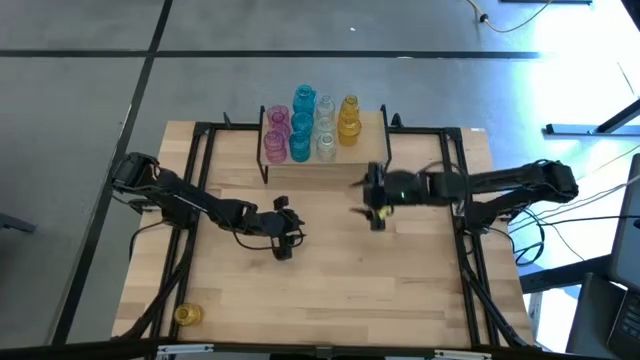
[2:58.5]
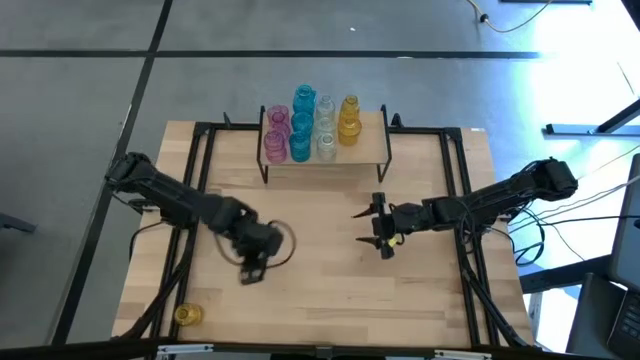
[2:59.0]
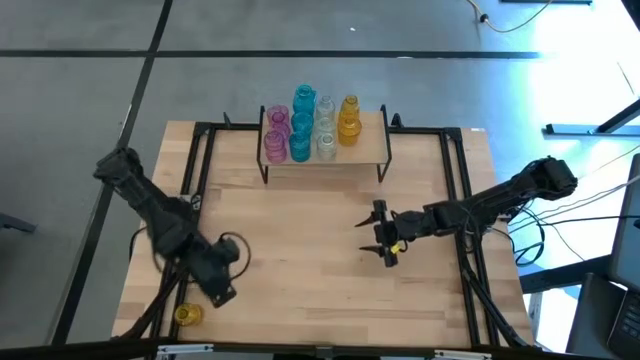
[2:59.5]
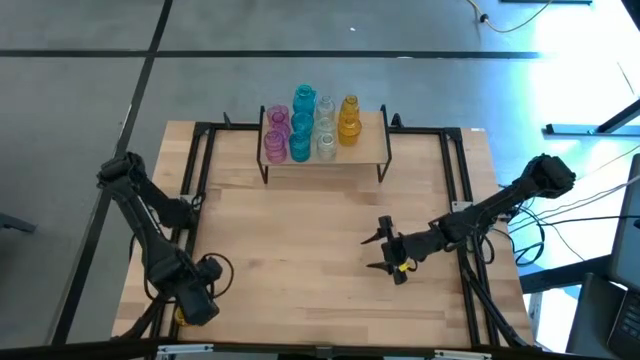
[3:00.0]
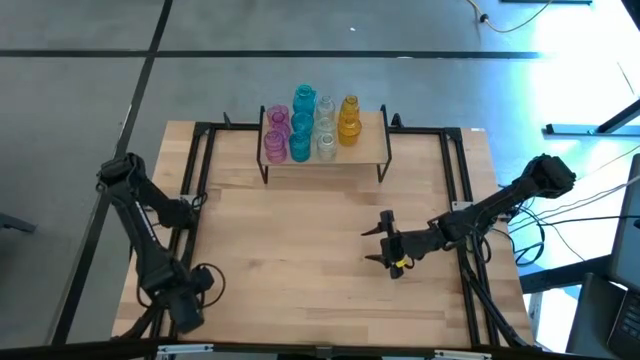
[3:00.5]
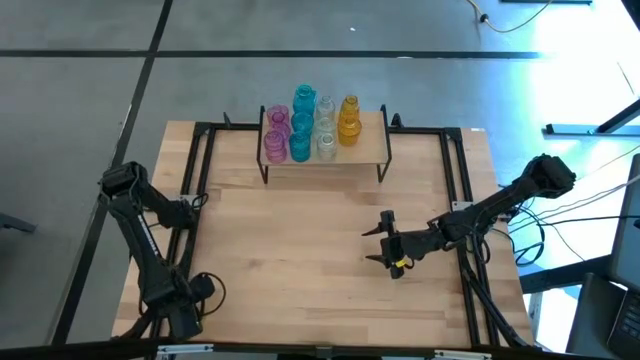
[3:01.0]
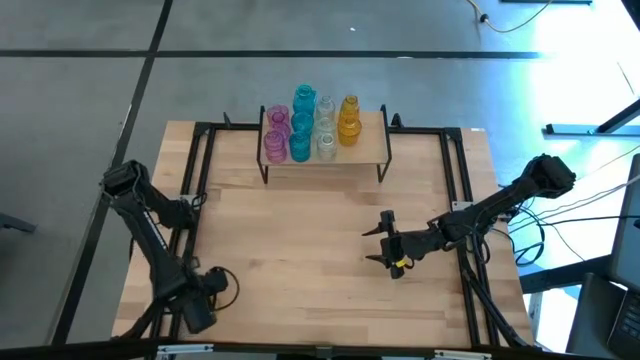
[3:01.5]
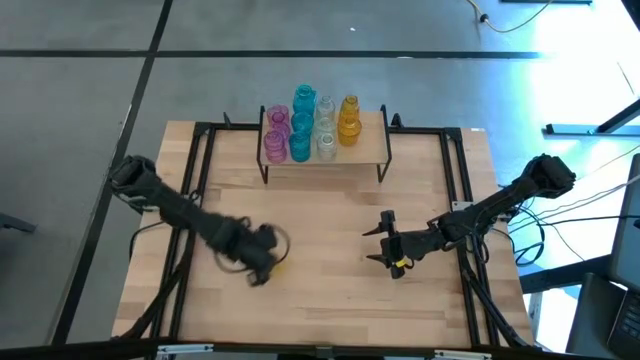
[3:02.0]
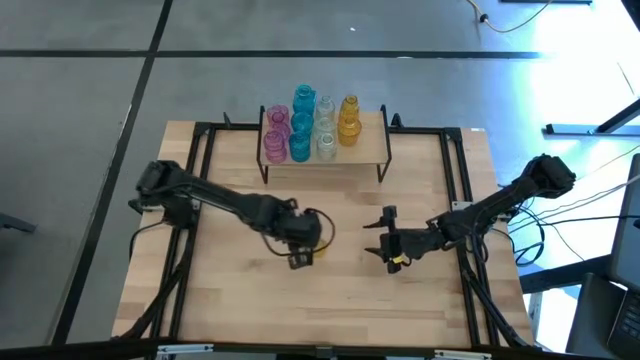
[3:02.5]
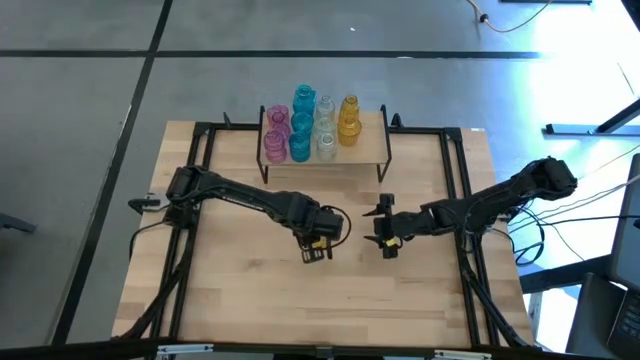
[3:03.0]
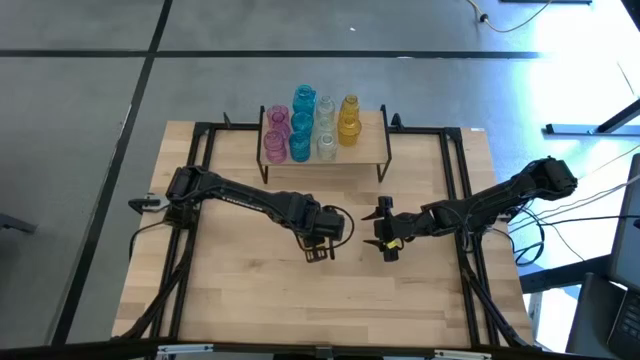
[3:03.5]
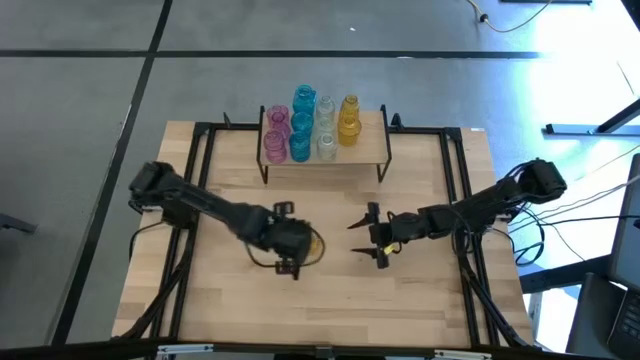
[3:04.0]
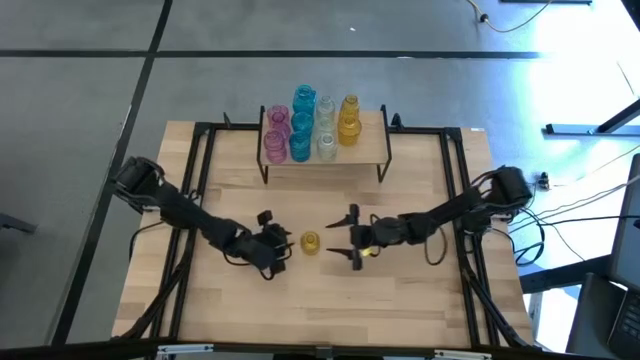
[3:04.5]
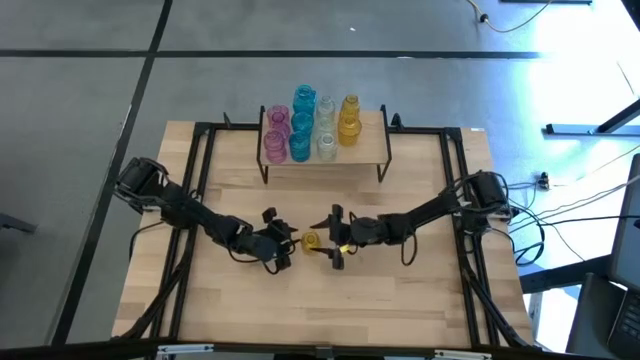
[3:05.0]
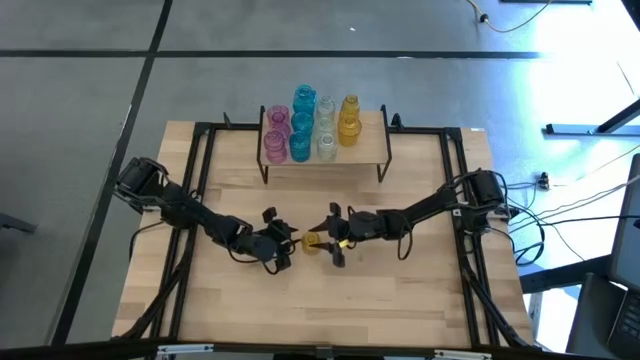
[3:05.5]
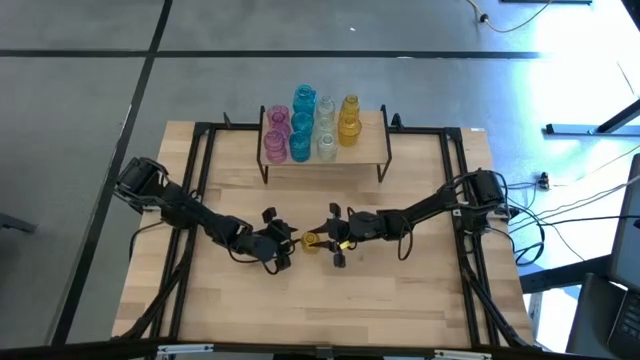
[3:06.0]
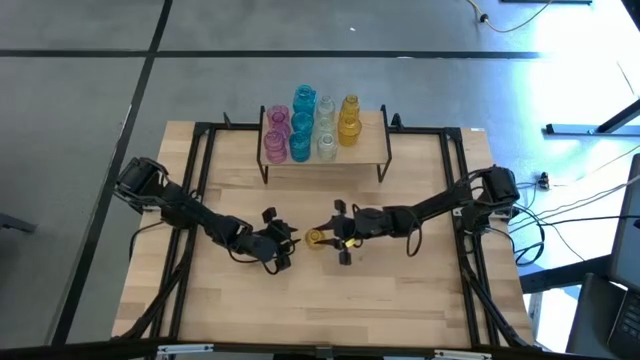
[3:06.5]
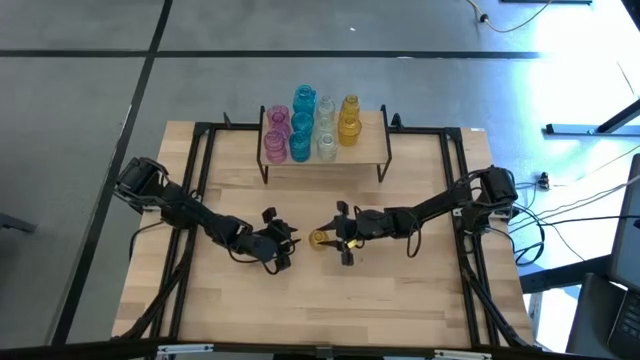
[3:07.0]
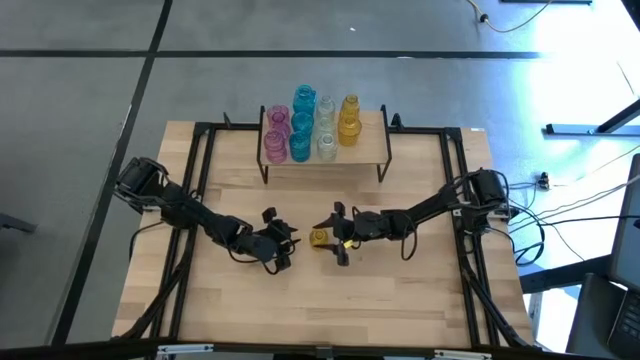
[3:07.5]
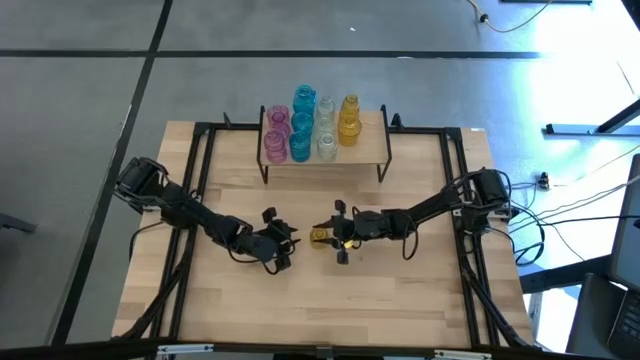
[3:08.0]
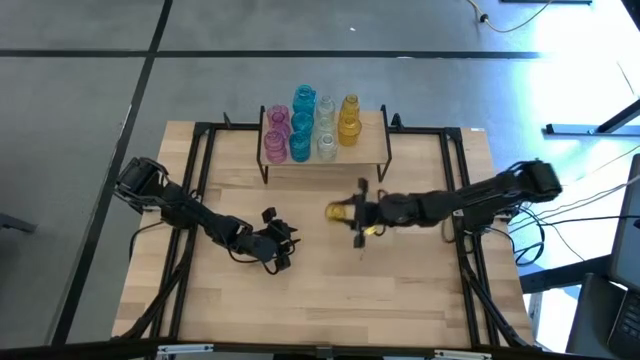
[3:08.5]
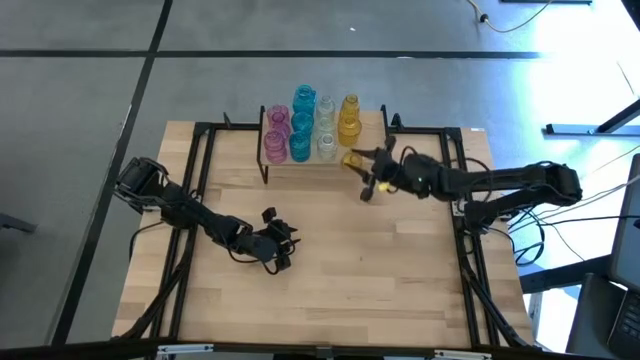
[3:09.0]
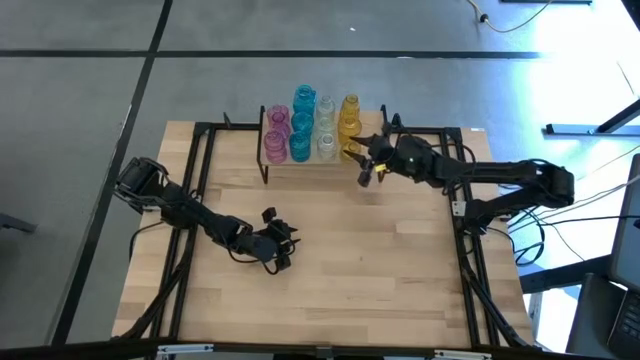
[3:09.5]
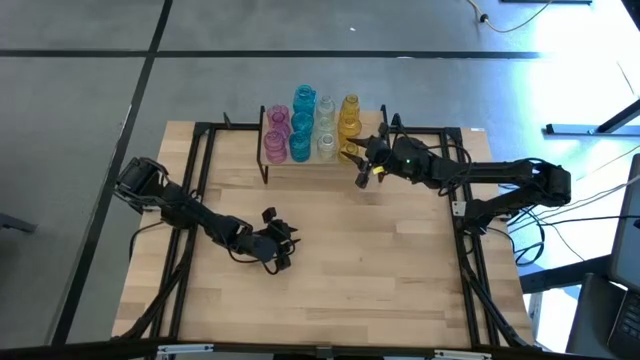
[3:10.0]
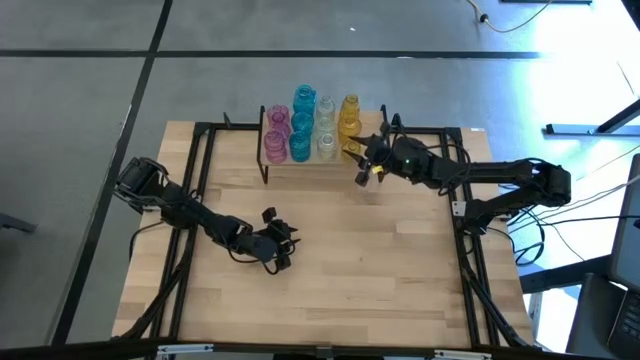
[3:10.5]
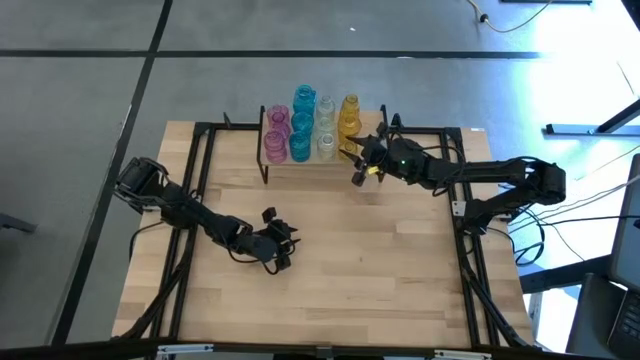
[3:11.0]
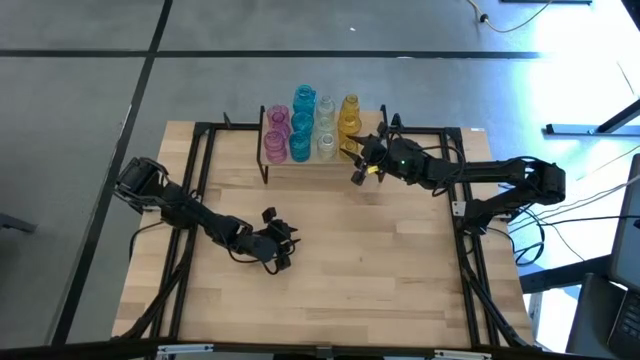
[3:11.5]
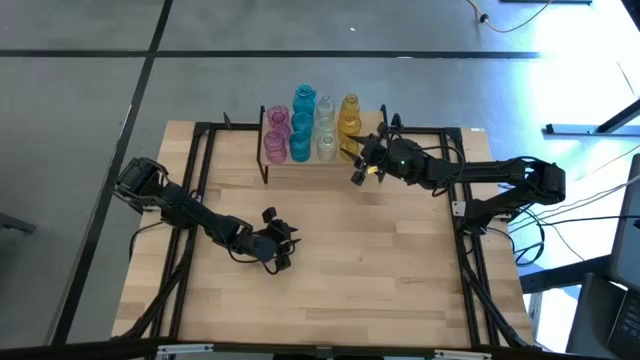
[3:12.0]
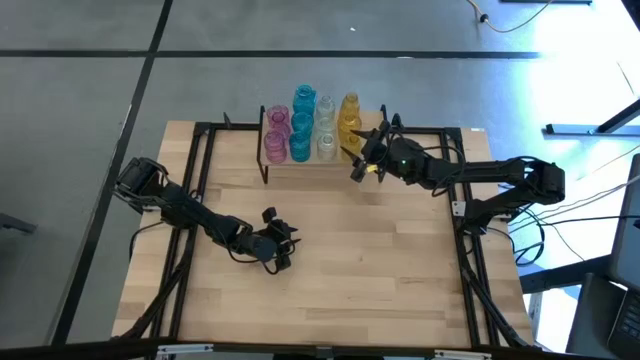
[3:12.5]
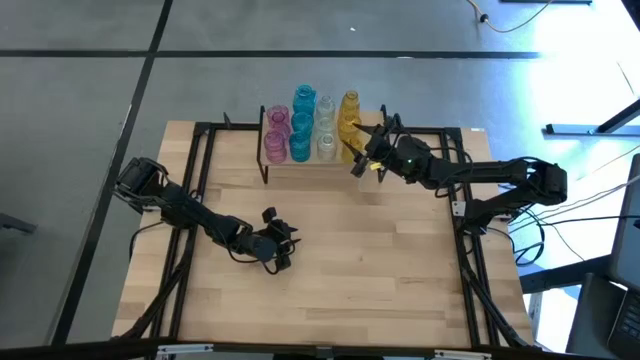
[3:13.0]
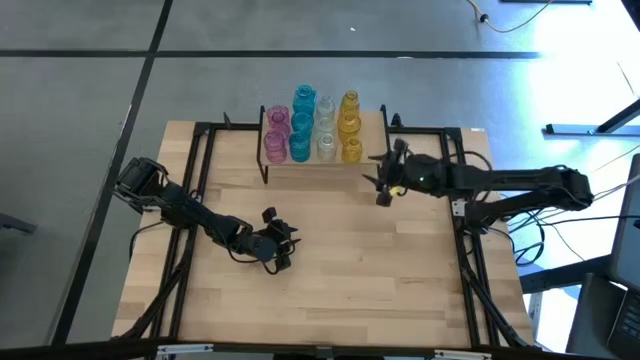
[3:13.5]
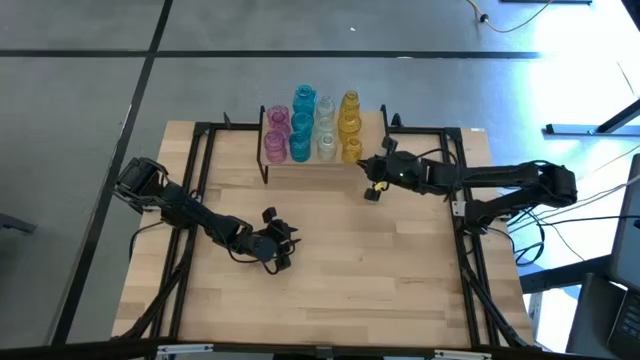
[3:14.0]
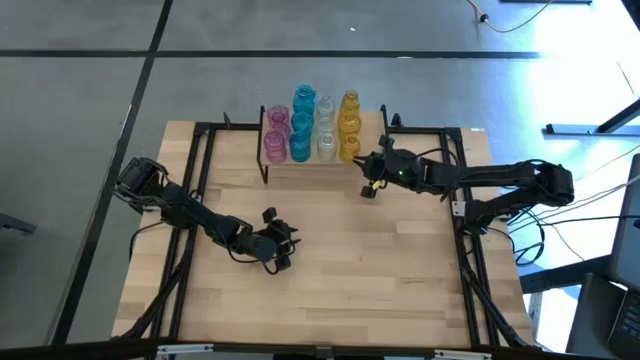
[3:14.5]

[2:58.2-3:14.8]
Task: sort vases onto shelf
Put the yellow flower vase on the shelf aligned with the other yellow flower vase

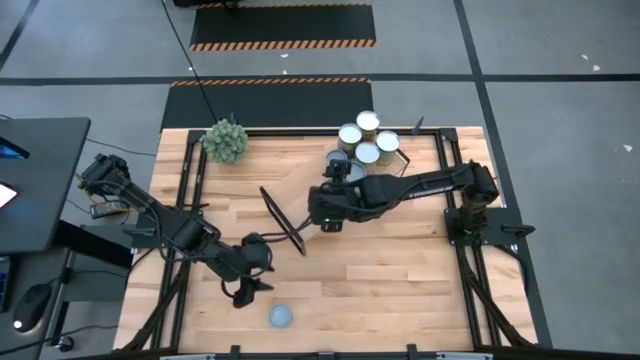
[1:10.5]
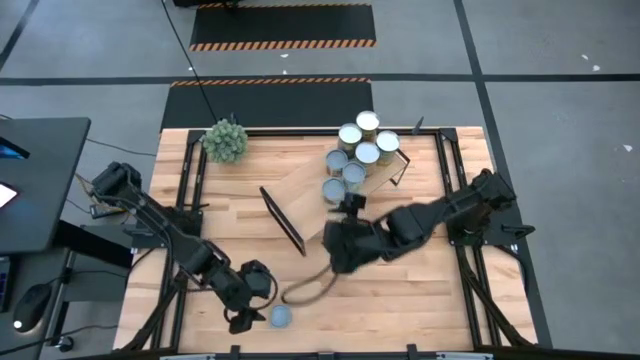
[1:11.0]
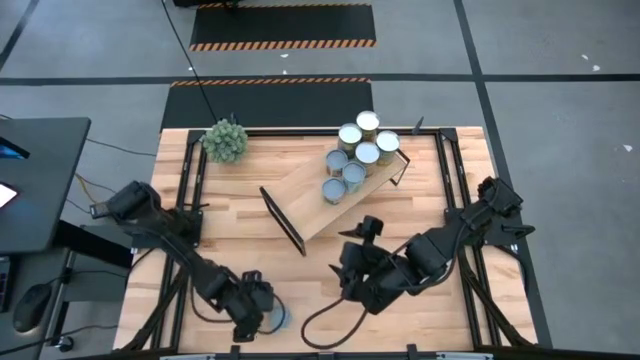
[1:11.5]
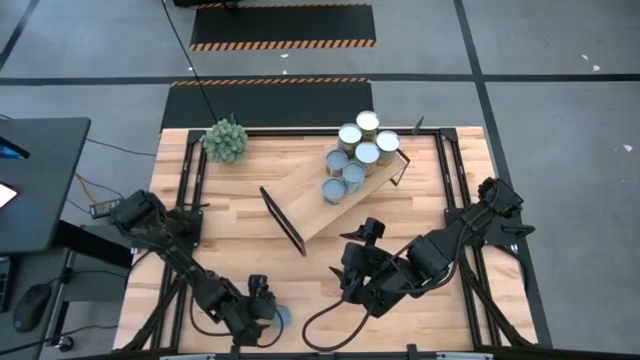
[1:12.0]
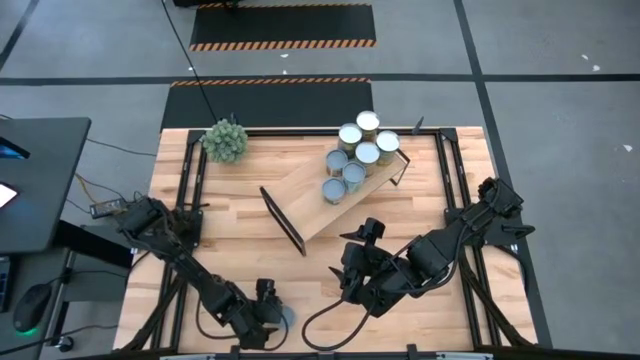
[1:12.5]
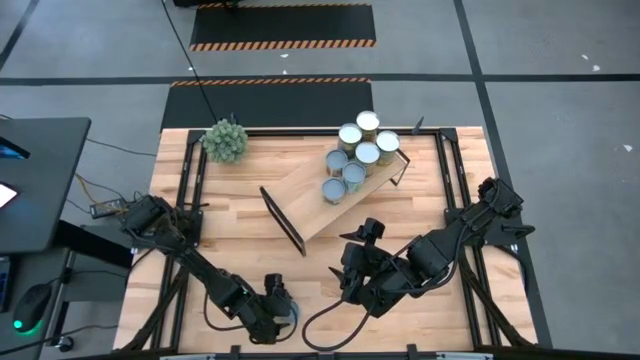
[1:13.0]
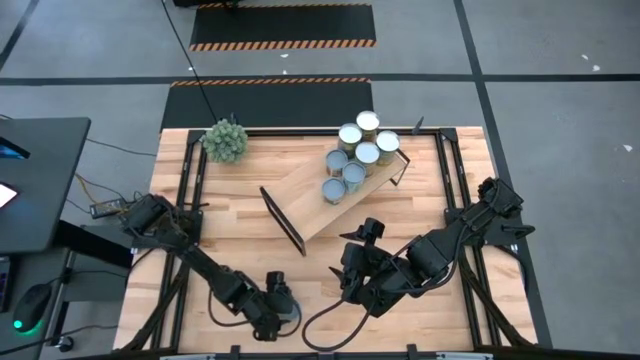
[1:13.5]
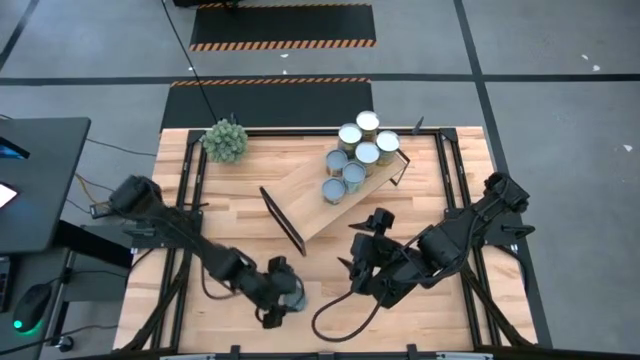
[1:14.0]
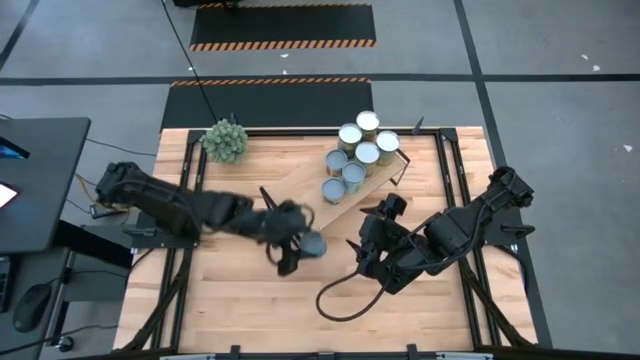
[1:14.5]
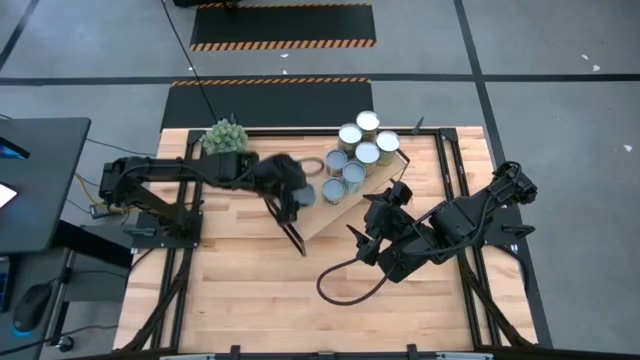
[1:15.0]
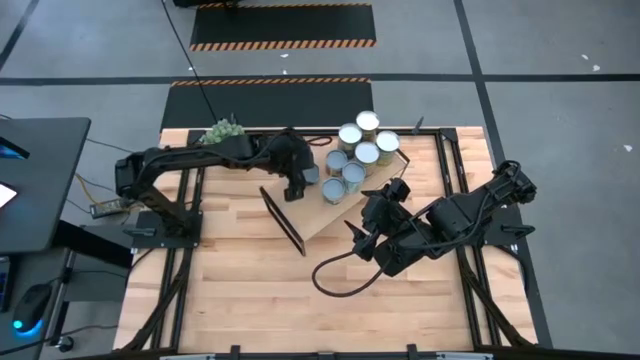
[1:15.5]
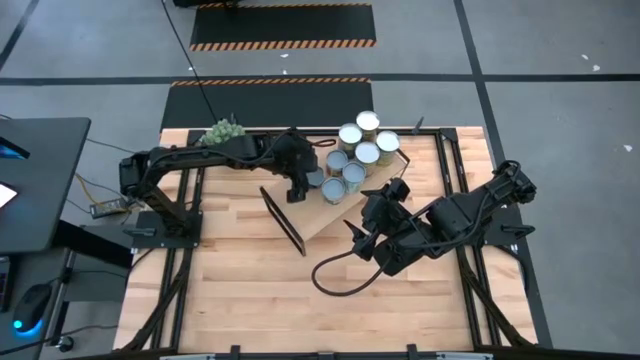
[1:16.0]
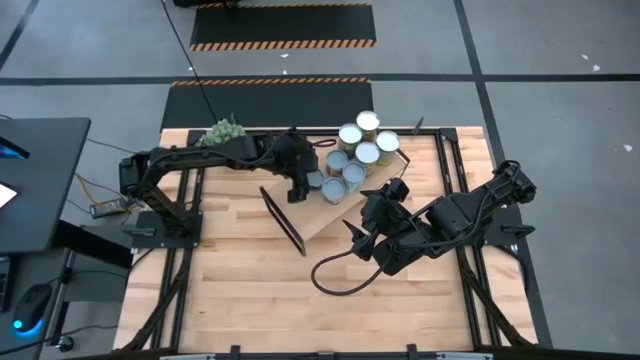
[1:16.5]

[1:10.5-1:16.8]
Task: Pick and place cans onto a shelf
Put the canned tuna on the shelf
